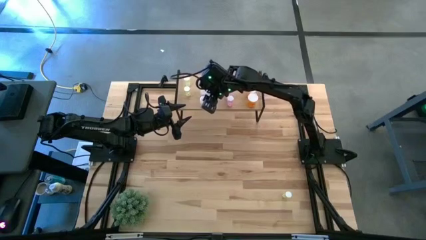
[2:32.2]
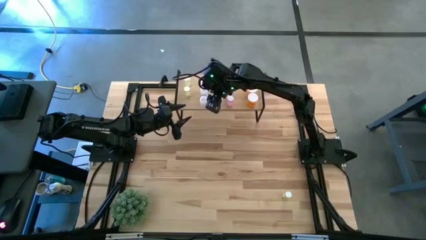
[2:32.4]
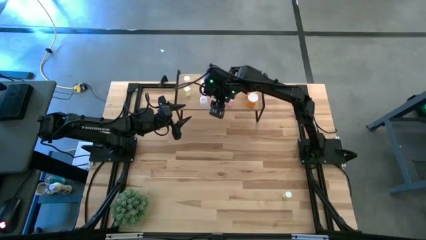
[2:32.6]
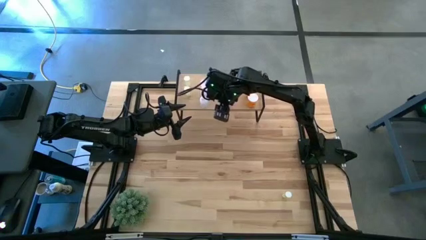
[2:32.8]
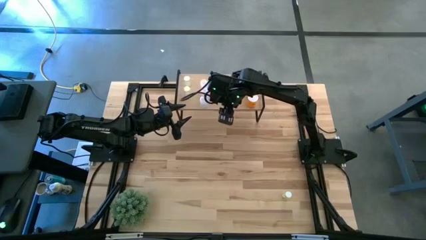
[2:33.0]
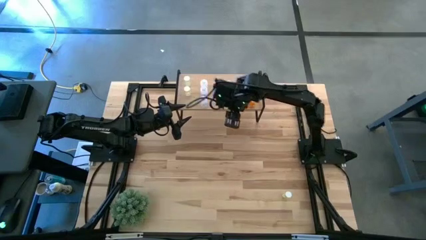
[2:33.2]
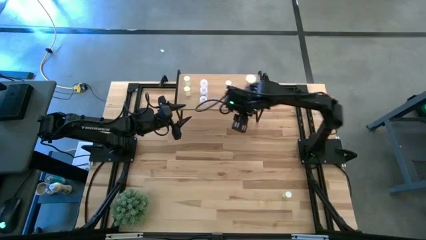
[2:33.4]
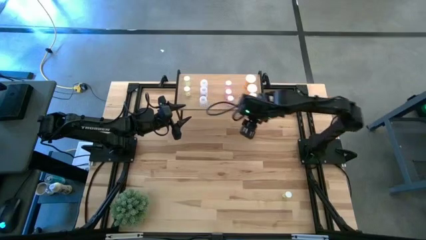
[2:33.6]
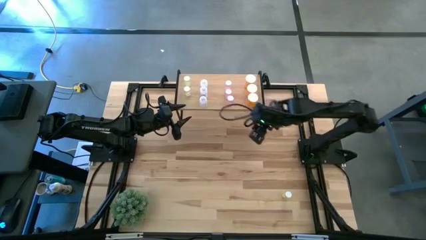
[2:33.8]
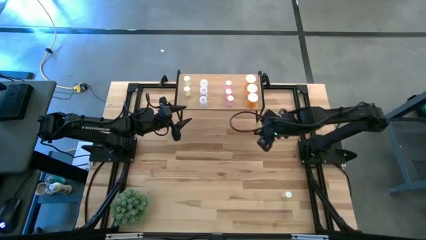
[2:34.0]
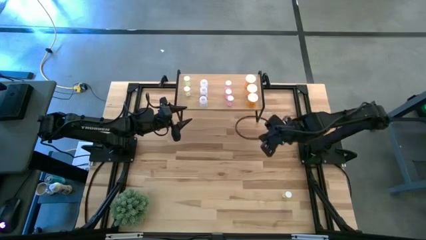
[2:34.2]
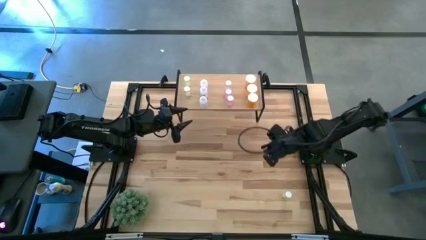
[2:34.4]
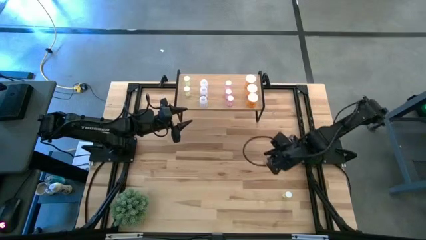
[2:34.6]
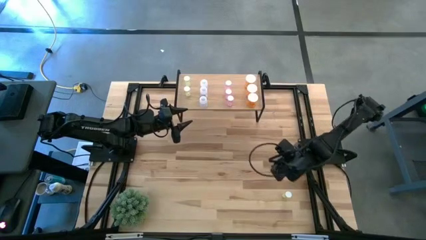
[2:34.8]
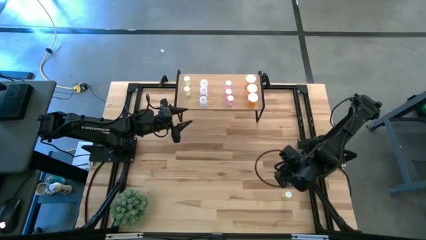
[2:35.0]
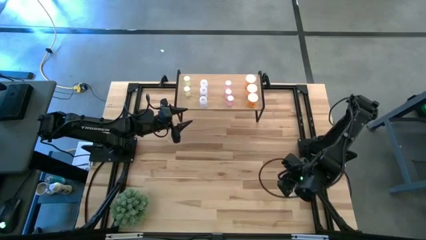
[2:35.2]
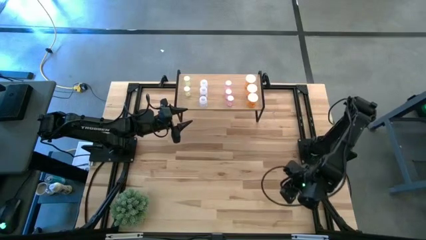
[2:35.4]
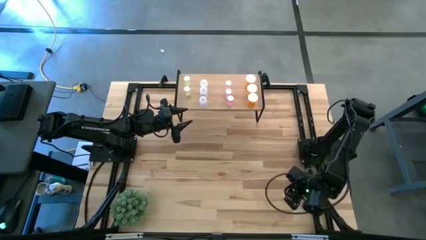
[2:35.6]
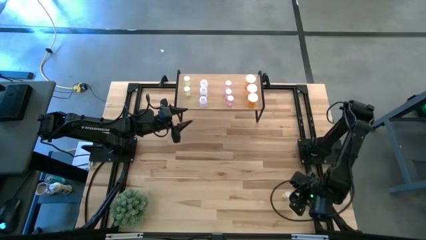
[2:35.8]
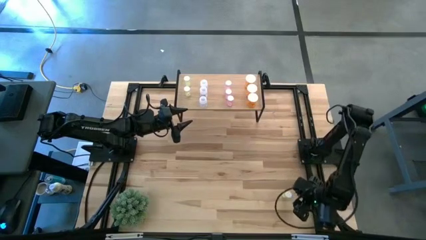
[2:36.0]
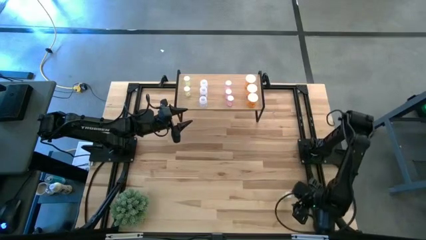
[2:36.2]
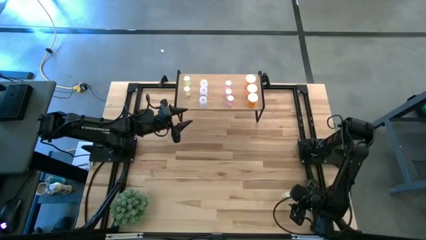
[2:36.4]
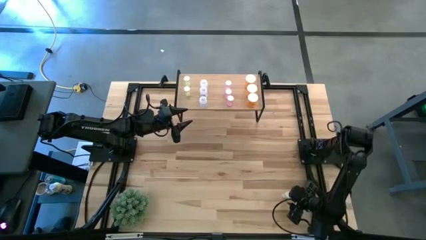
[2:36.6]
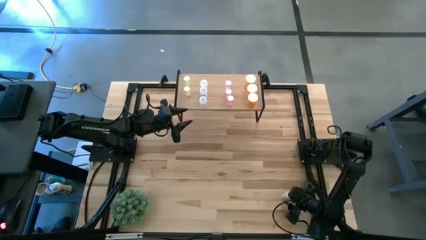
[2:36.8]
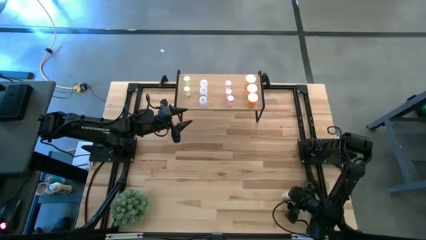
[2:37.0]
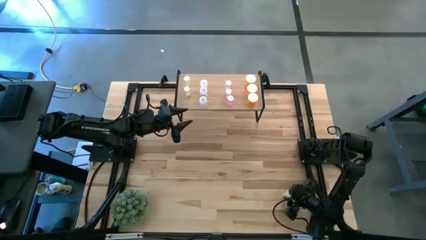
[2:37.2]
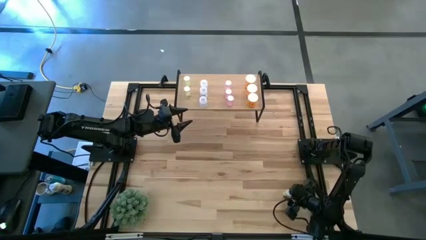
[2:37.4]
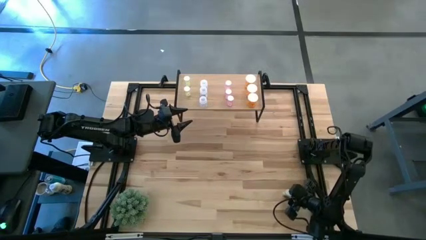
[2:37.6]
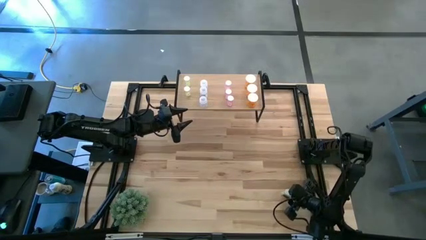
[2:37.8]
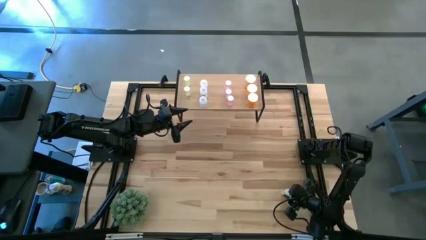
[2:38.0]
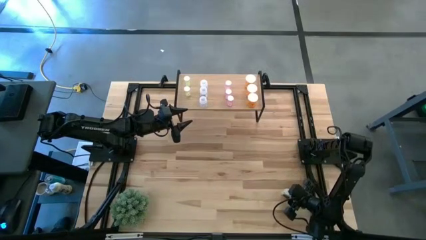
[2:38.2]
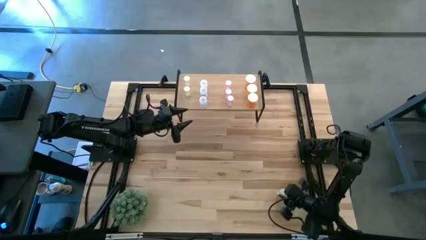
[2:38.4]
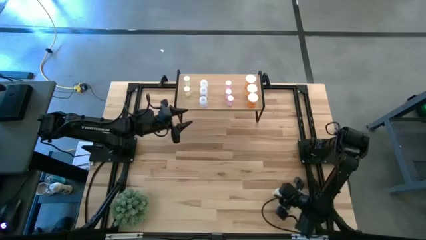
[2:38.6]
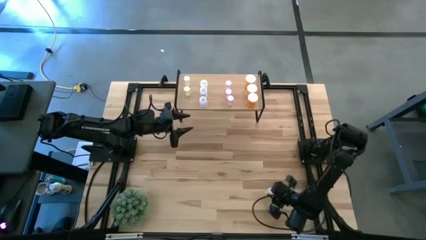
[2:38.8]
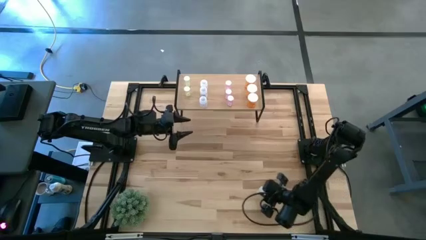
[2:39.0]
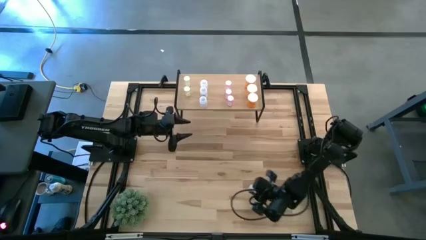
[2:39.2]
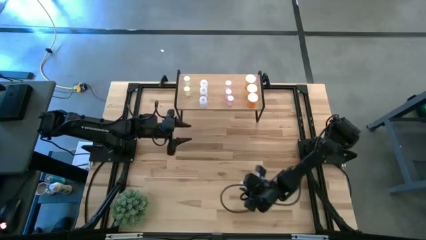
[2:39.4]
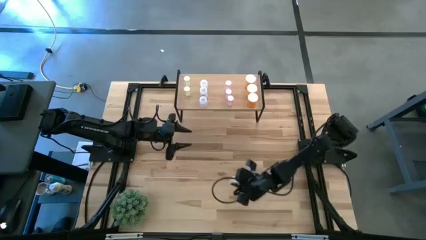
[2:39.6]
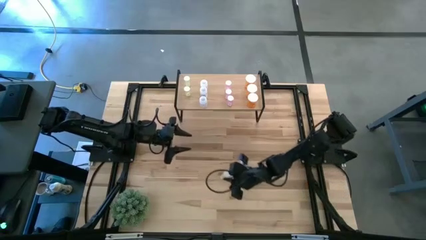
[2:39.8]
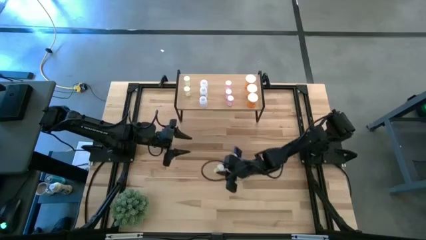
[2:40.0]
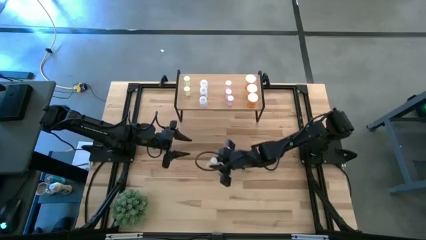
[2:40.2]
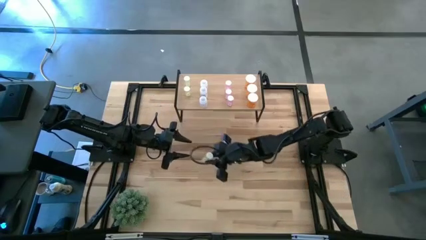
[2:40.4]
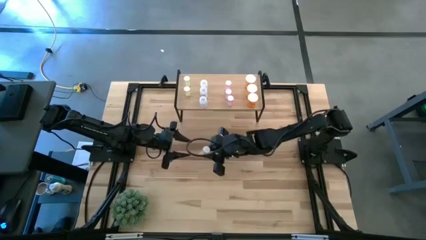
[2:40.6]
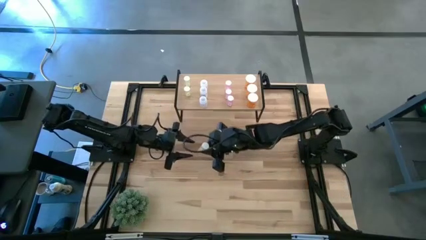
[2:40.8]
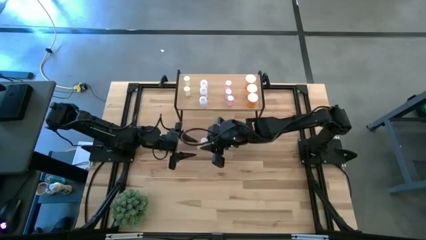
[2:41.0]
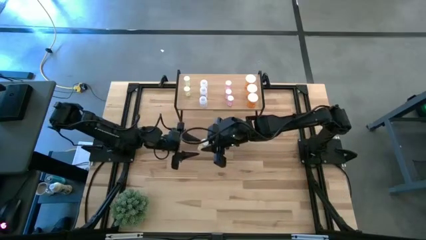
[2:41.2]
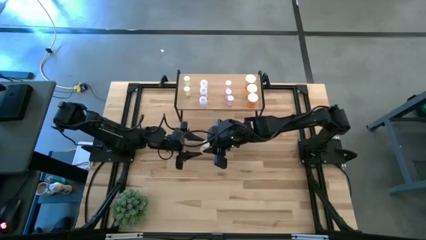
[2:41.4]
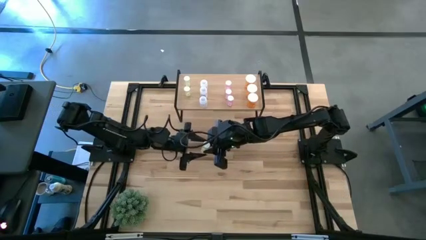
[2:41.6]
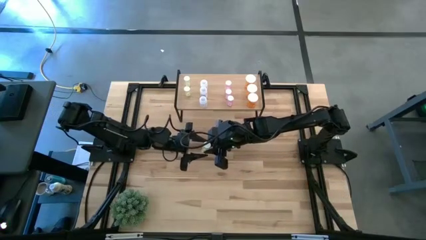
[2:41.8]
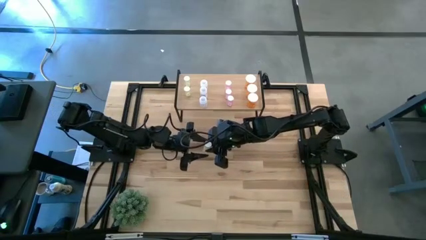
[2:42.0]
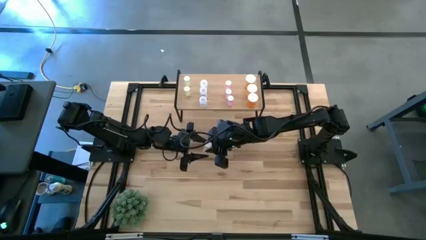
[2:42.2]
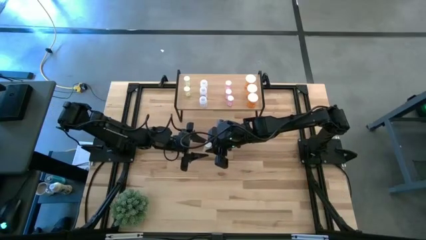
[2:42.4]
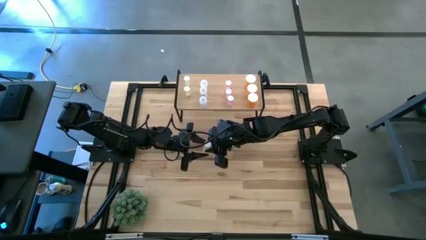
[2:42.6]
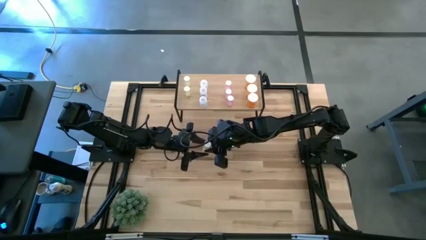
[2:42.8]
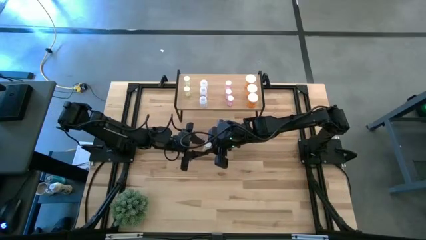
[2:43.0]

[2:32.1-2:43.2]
Task: Pick and place medicine bottles onto shelf by color
Put the yellow pill bottle aligned with the other yellow pill bottles on the shelf

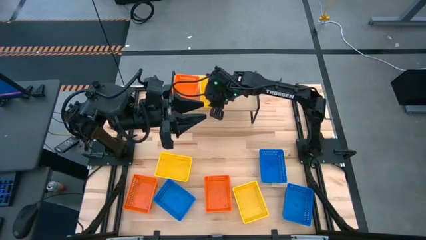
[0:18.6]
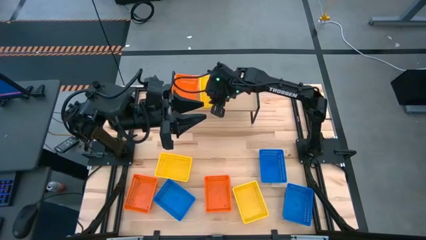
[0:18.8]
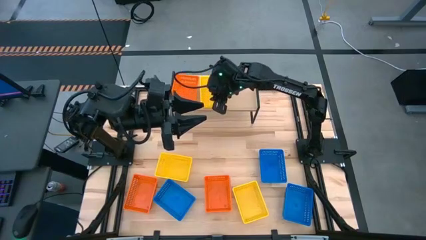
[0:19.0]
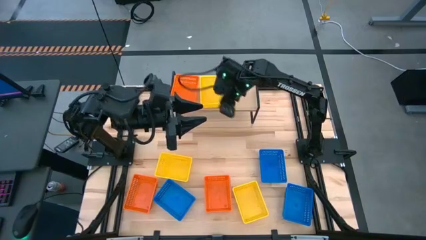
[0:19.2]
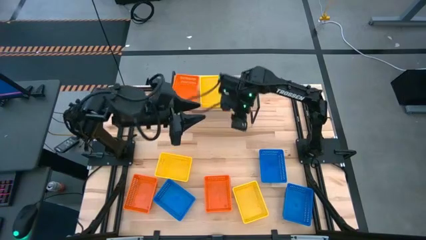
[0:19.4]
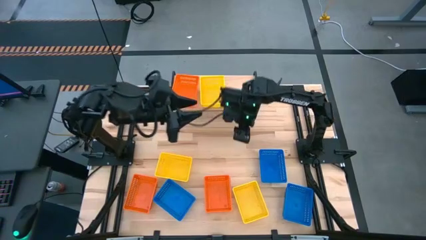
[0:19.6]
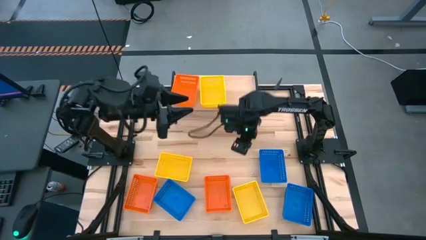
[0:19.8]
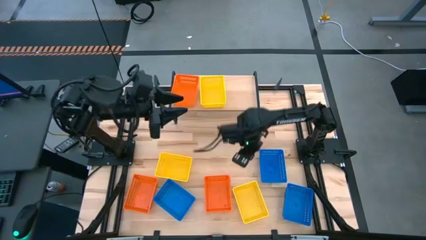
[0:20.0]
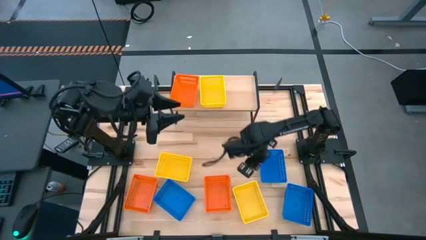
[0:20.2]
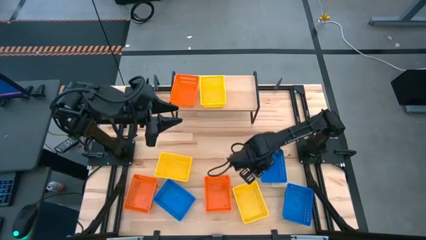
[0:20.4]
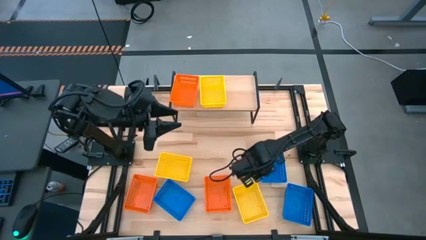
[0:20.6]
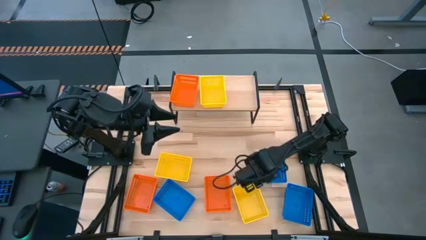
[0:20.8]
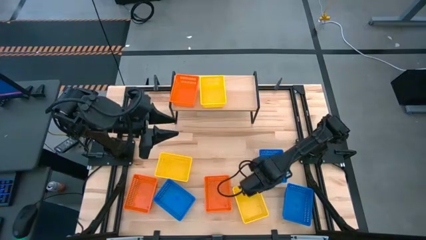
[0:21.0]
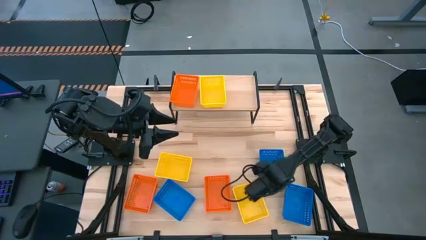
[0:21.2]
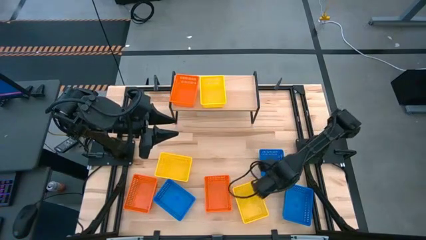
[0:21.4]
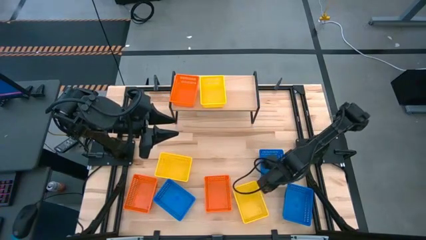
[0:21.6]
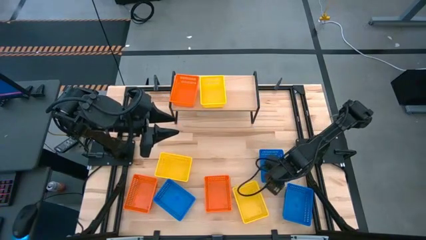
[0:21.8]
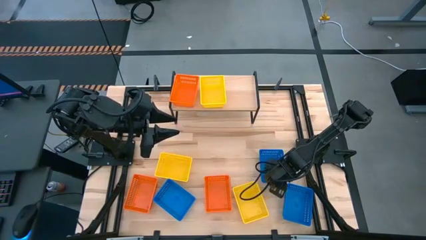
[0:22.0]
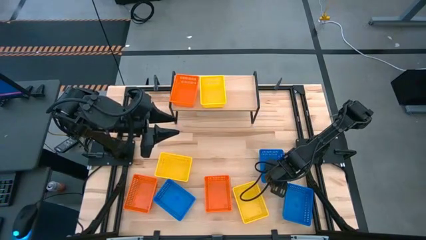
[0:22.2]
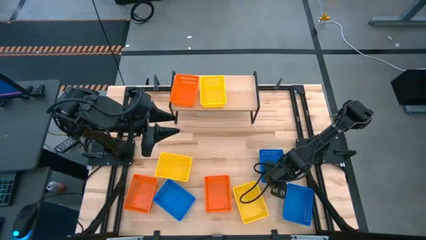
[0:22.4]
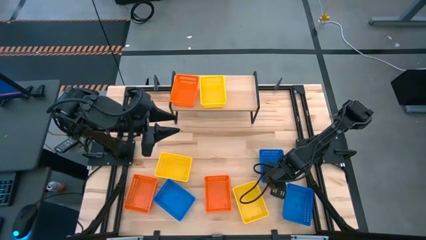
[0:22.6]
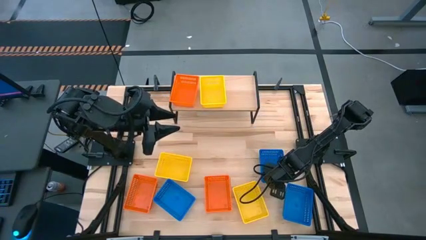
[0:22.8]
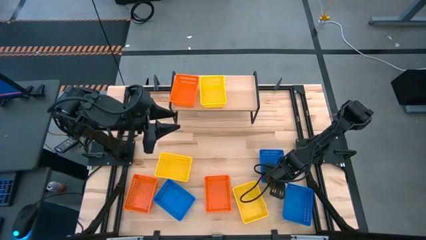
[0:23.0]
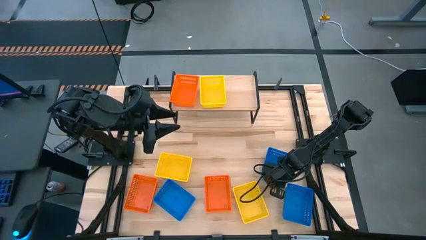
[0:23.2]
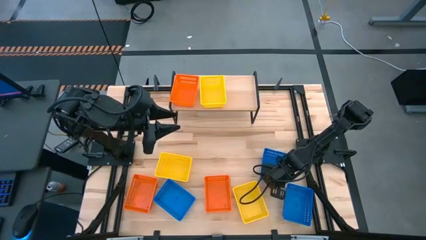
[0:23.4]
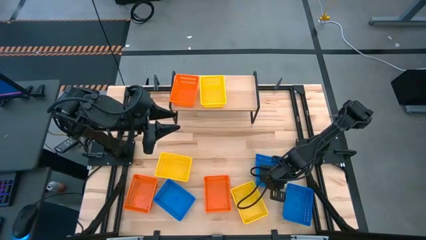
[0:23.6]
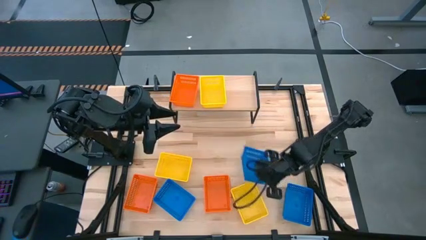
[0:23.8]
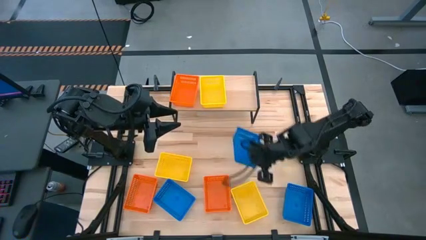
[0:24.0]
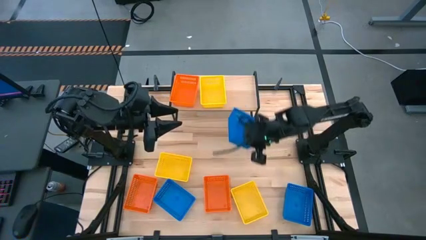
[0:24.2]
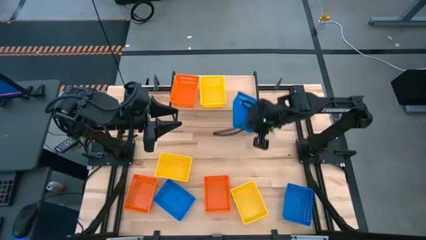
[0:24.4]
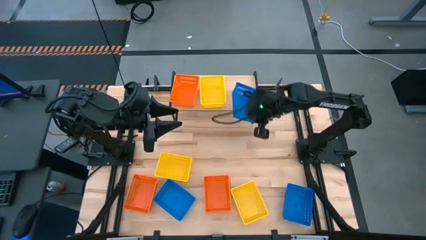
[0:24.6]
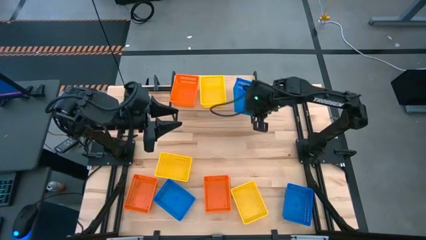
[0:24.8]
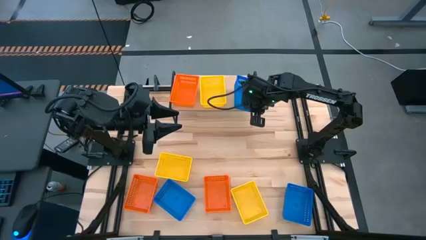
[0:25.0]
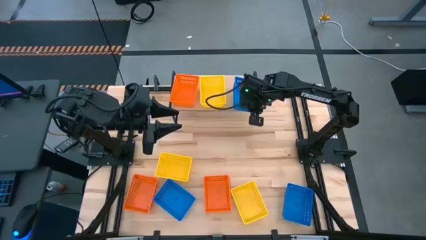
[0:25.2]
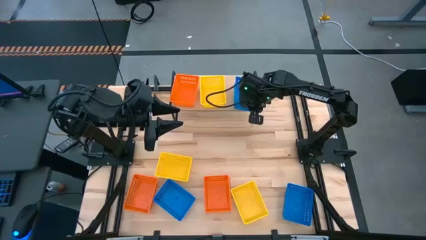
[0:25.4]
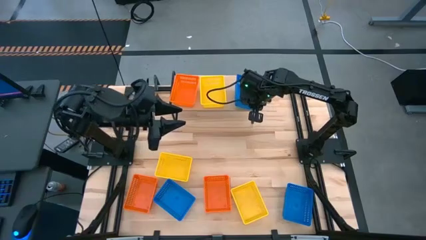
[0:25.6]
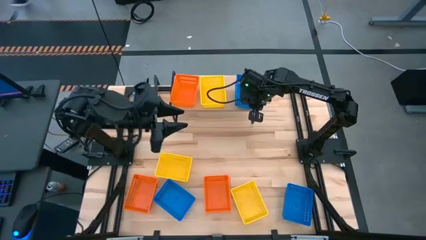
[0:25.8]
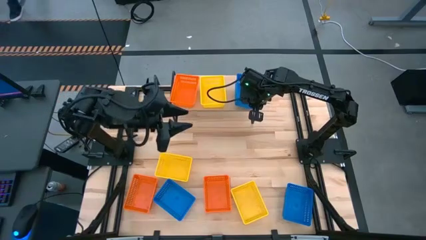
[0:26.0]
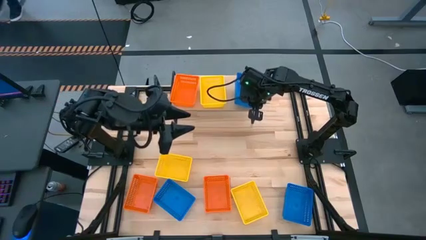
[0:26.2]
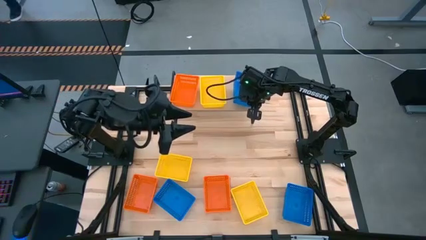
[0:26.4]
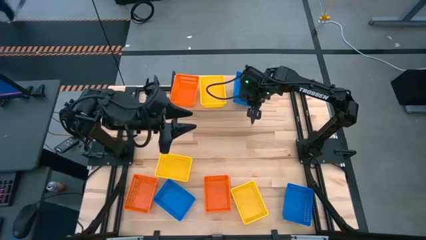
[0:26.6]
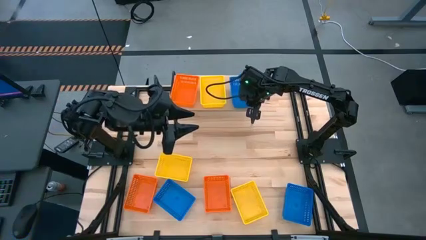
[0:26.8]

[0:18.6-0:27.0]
Task: Stack baskets on shelf by color
Put the top blue bin on top of the shelf
